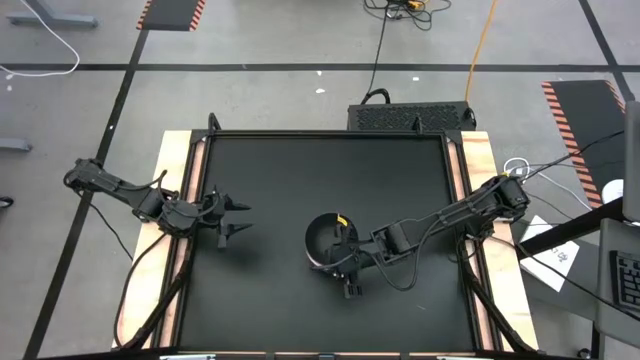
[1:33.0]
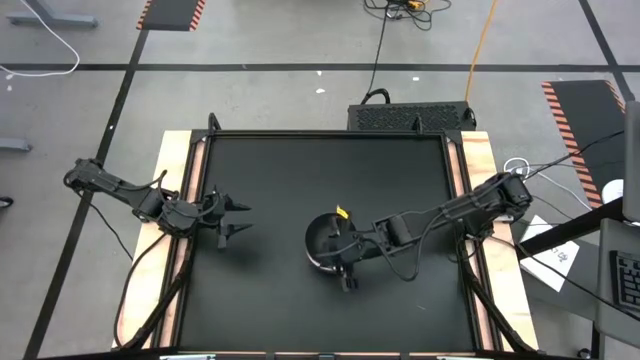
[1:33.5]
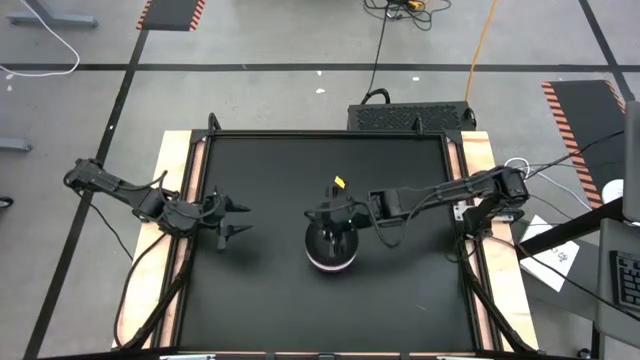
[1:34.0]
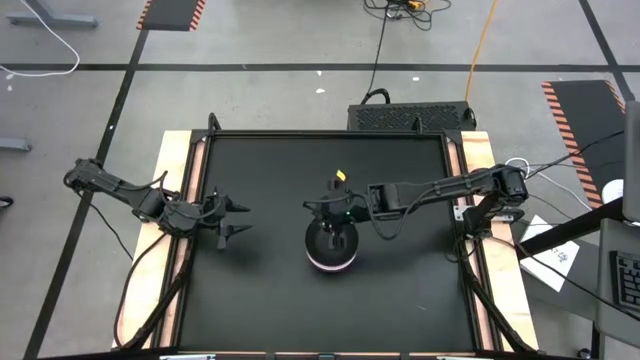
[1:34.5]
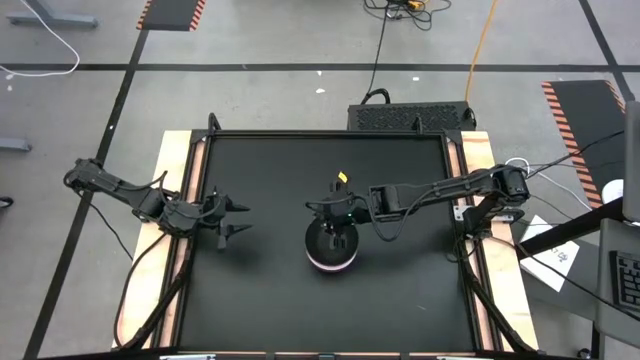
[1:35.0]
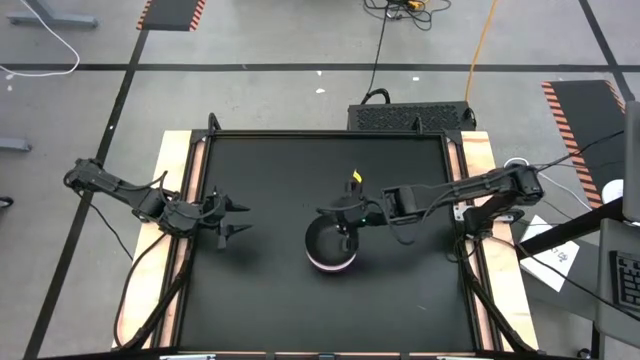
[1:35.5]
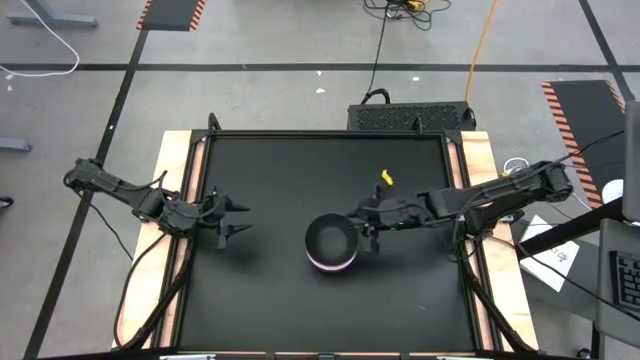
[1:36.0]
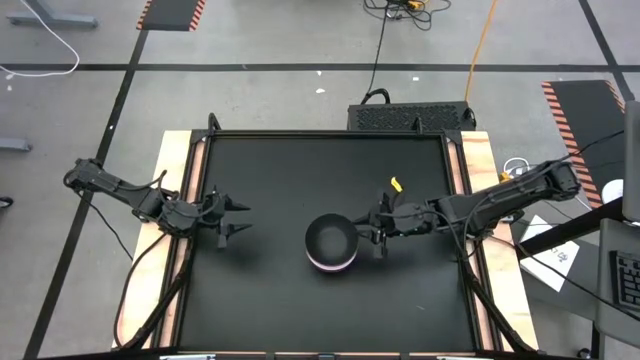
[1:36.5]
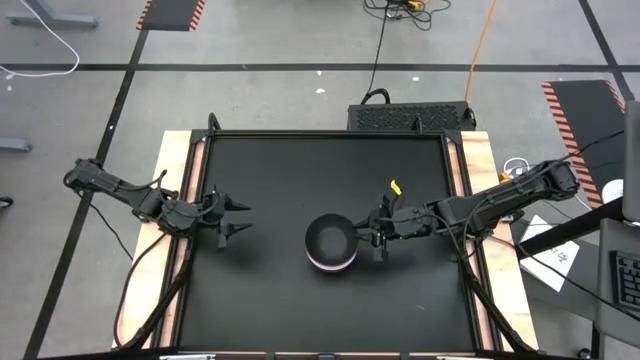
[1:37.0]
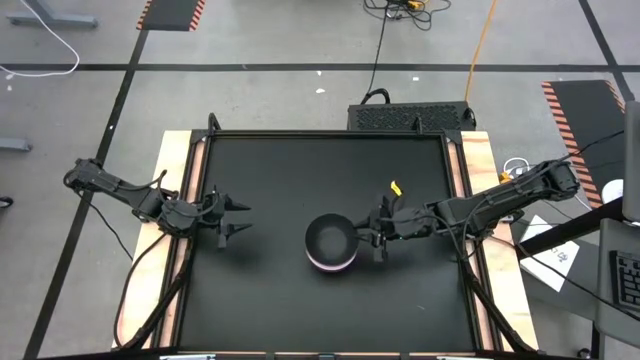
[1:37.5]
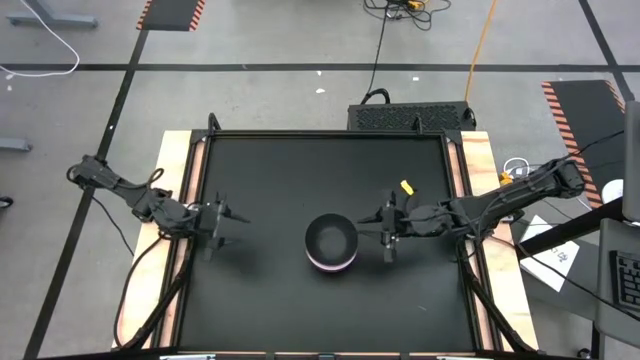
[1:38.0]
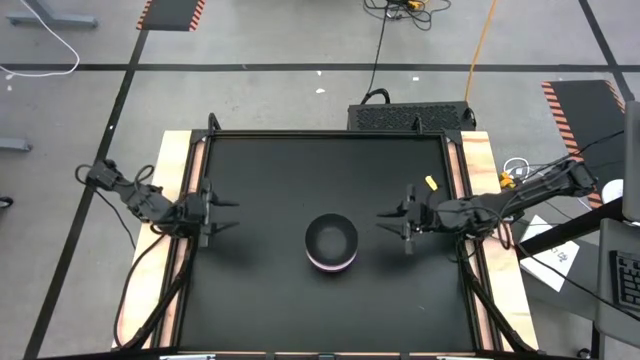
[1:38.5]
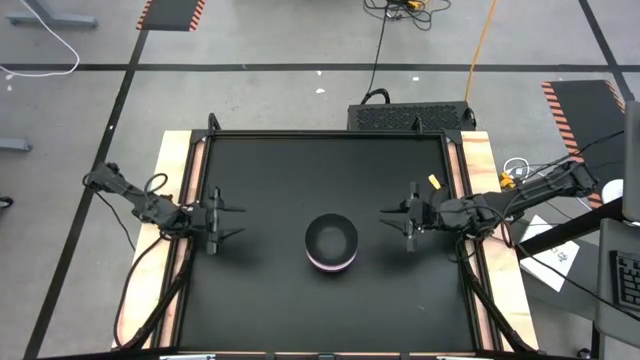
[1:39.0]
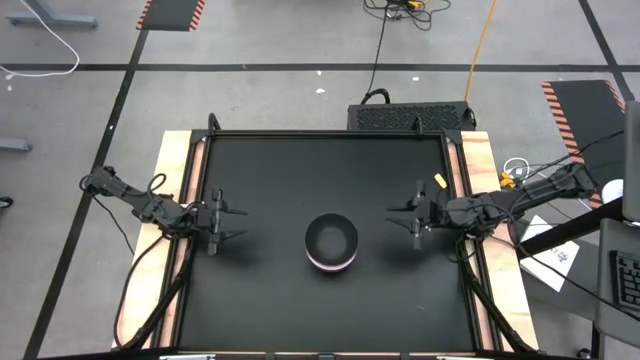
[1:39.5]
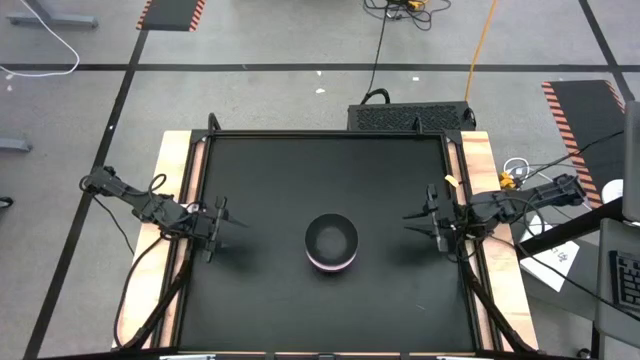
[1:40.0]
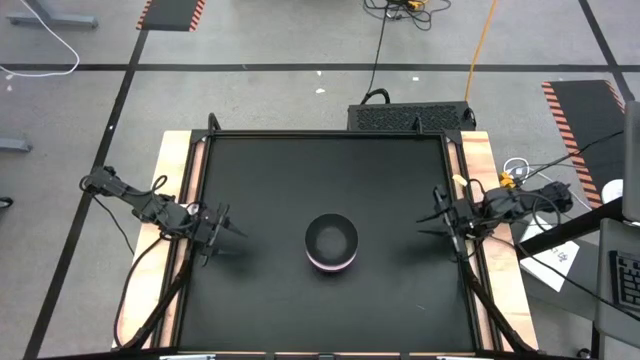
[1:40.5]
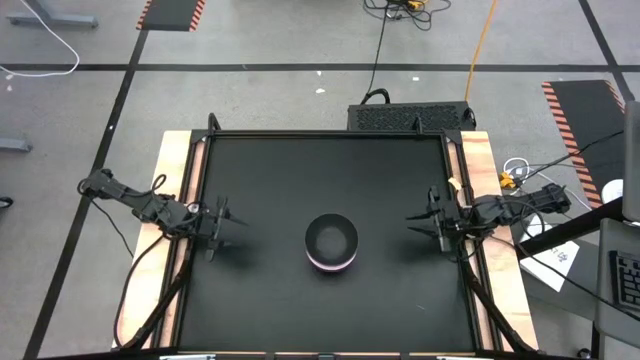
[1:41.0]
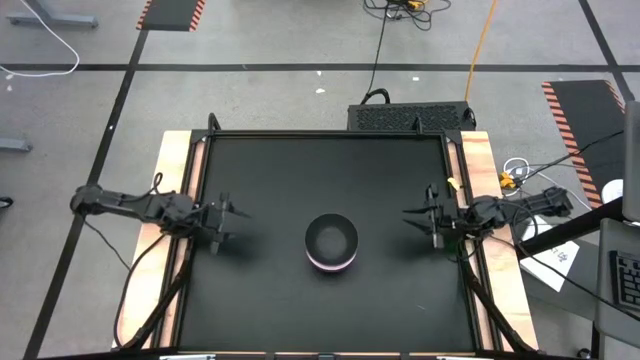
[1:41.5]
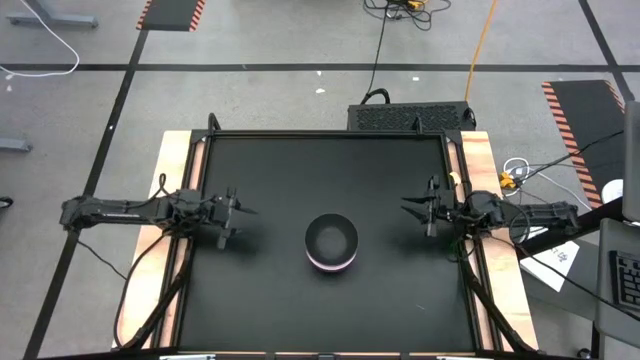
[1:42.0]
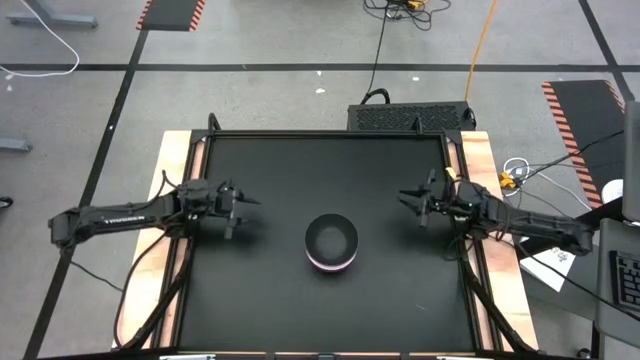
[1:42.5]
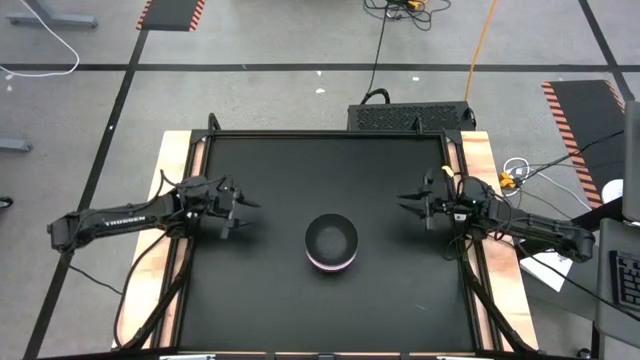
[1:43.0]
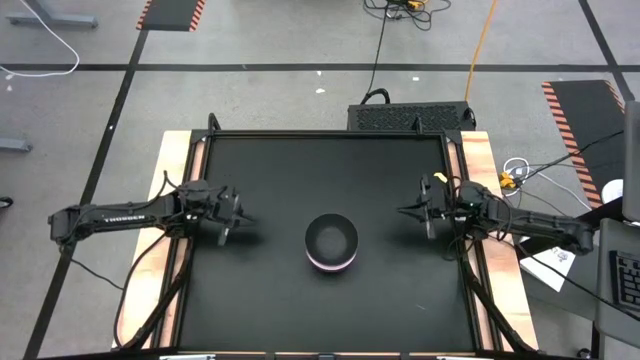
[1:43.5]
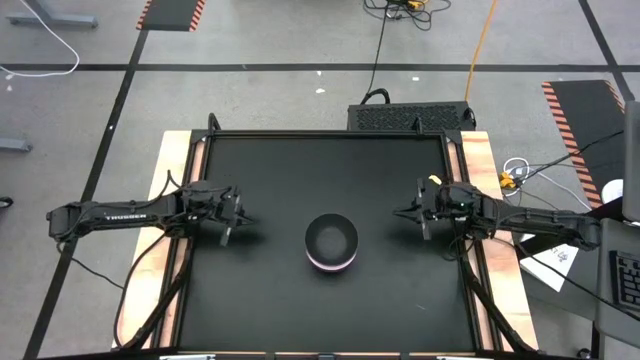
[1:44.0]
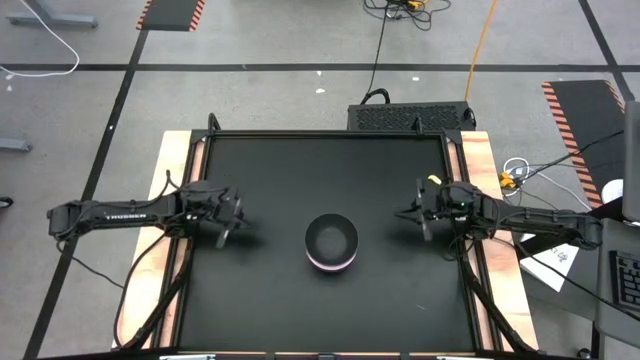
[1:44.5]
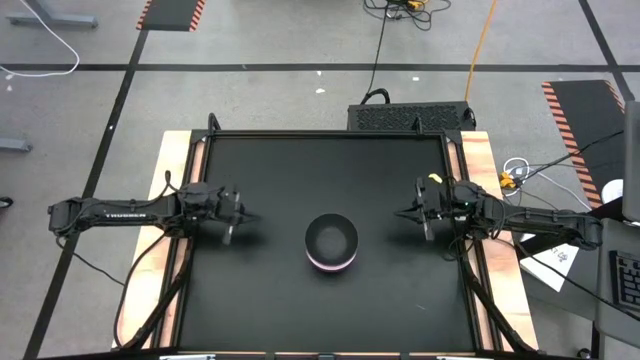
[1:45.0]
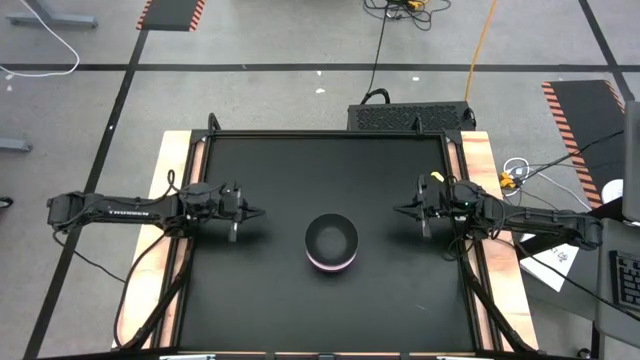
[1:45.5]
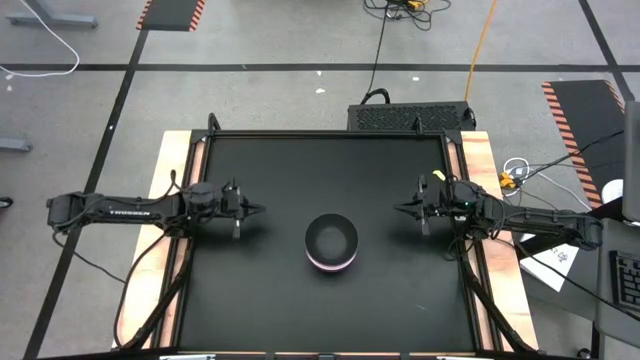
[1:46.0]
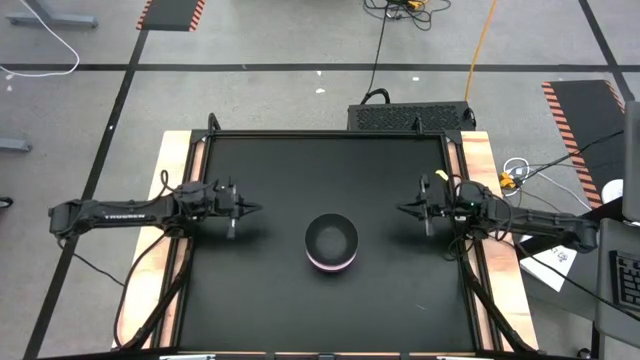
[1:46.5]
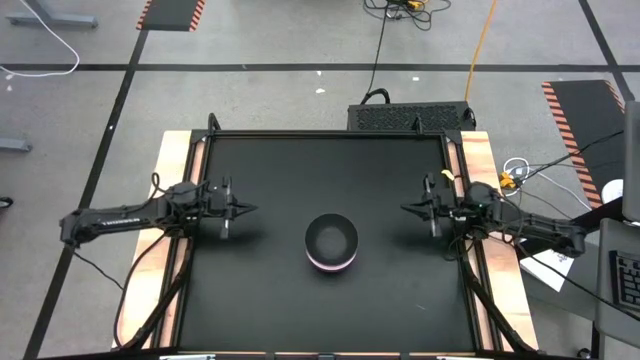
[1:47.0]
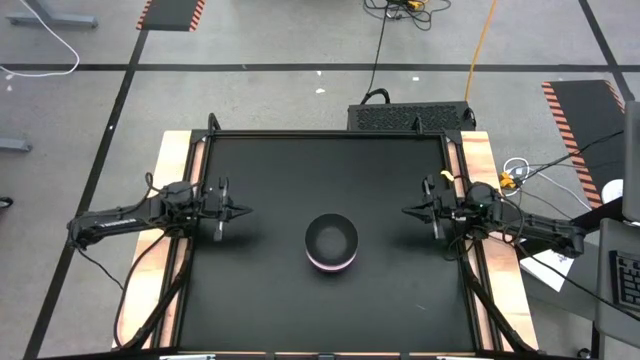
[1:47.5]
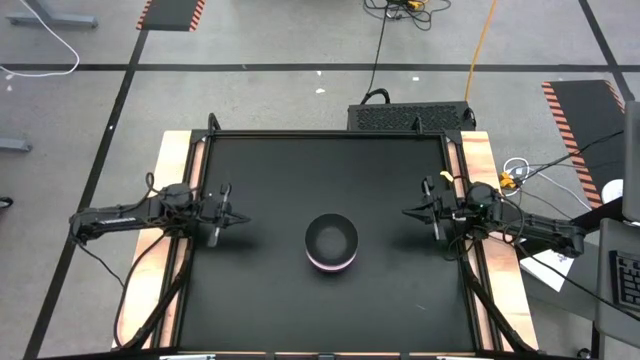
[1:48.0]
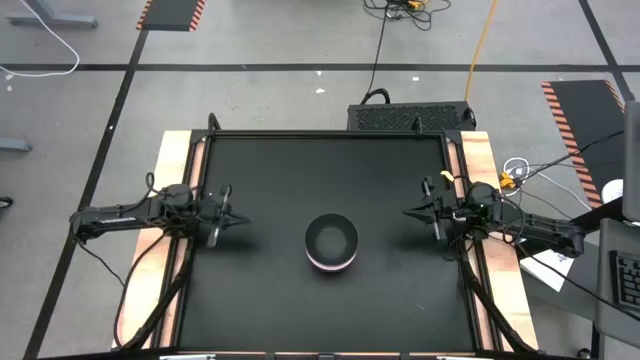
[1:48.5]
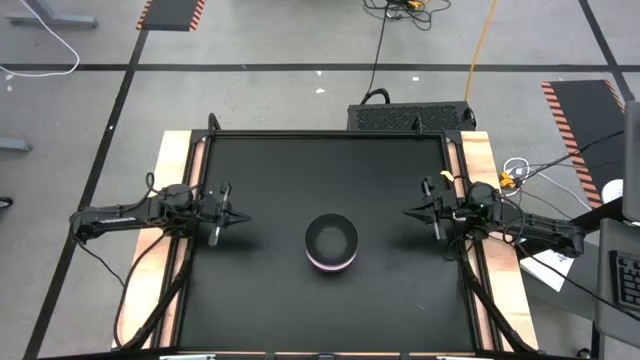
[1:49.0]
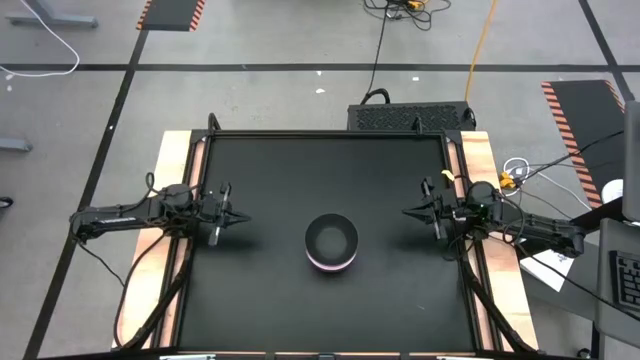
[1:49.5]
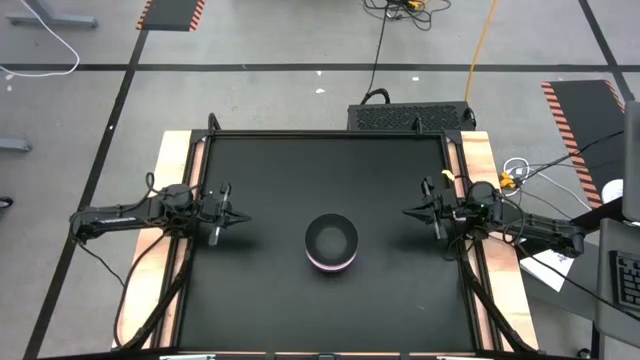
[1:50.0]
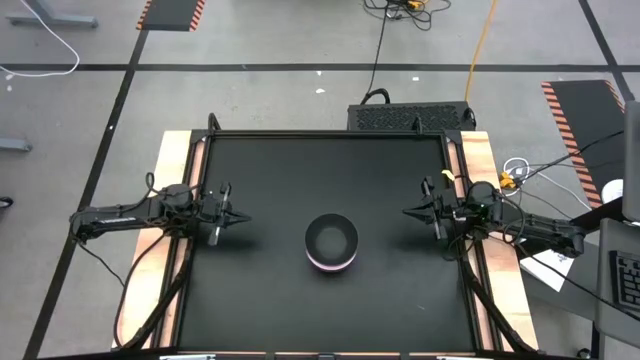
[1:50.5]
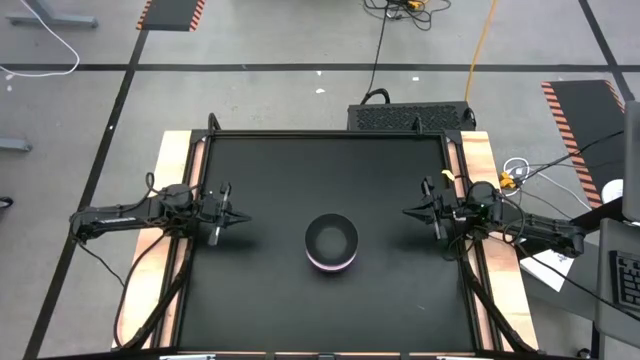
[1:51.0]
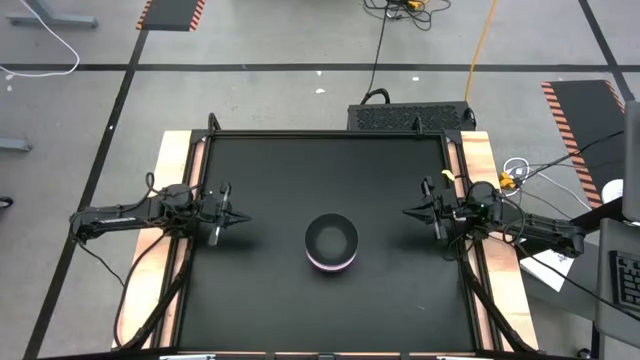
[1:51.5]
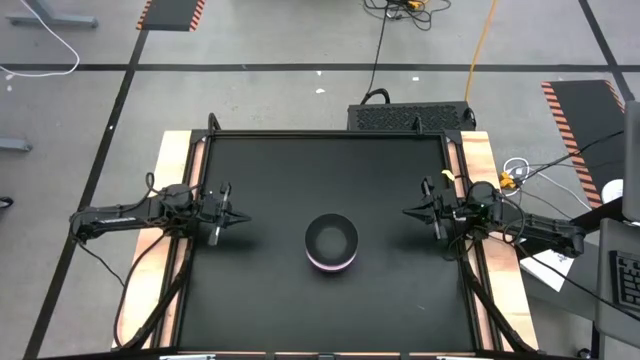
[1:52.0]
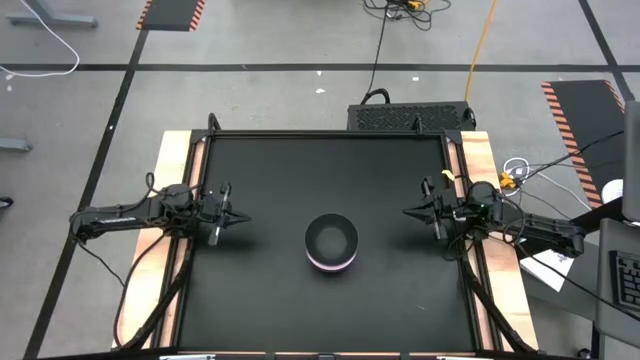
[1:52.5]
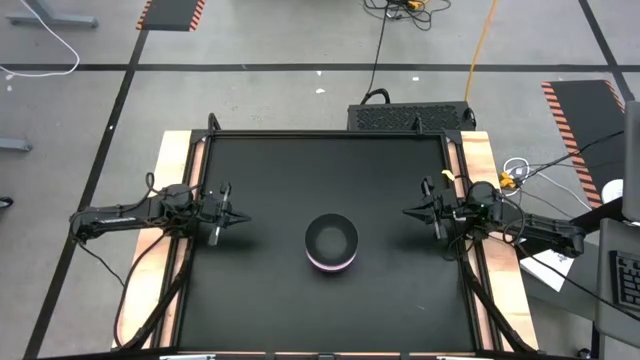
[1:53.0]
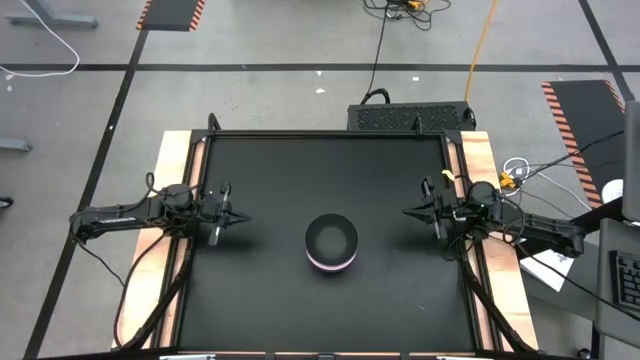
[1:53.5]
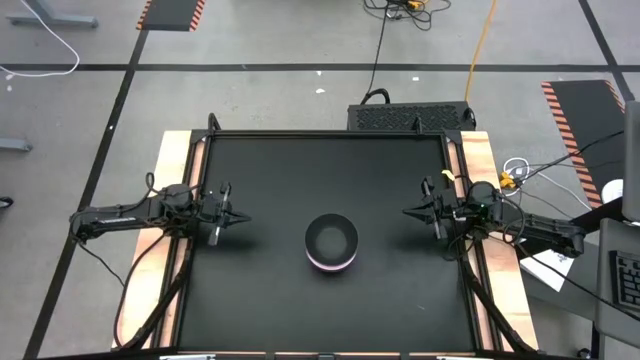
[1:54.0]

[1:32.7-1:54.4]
Task: Nest bowls inside each other
Return to Home Position
